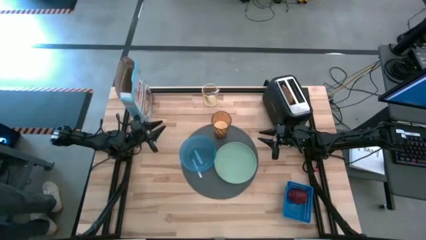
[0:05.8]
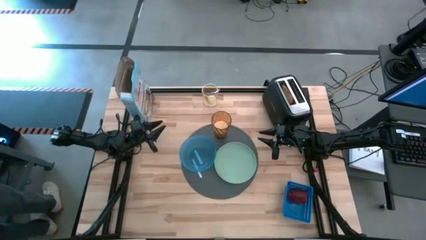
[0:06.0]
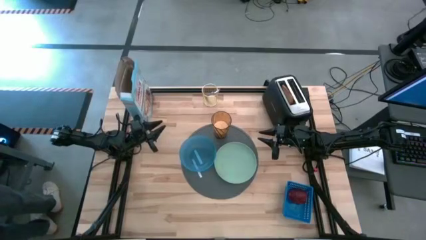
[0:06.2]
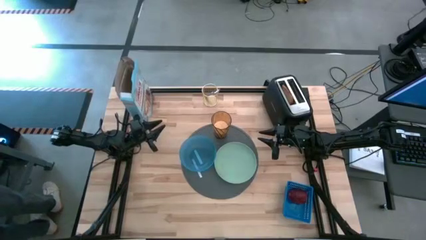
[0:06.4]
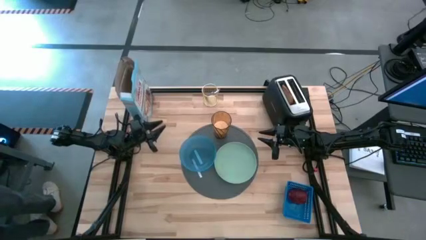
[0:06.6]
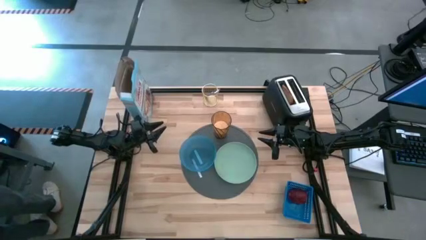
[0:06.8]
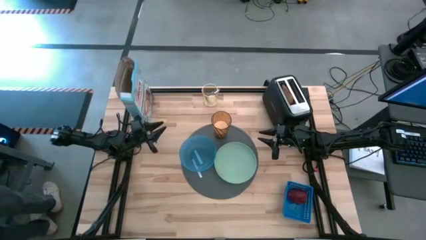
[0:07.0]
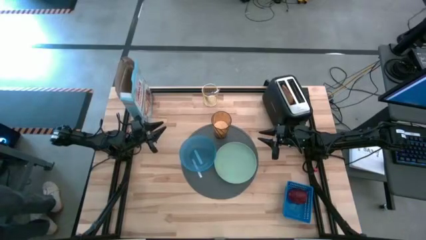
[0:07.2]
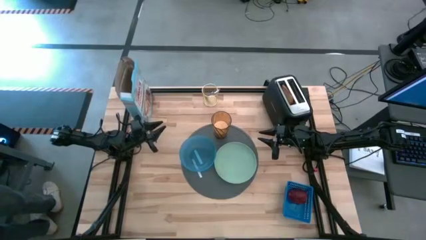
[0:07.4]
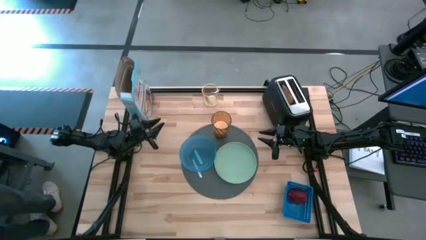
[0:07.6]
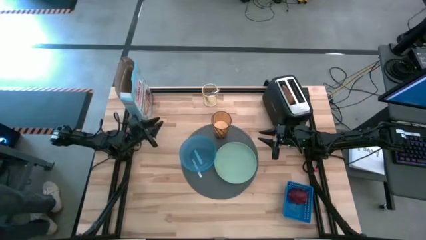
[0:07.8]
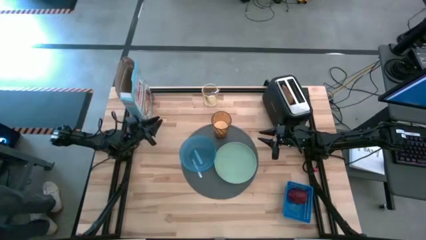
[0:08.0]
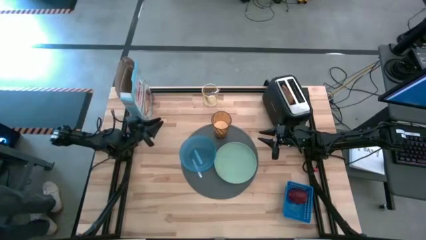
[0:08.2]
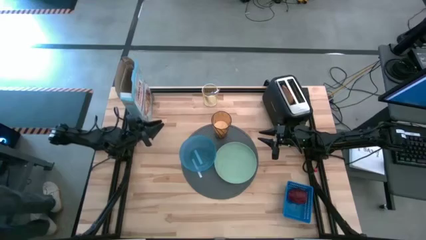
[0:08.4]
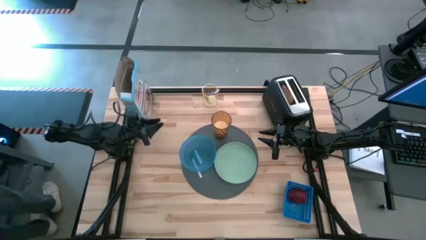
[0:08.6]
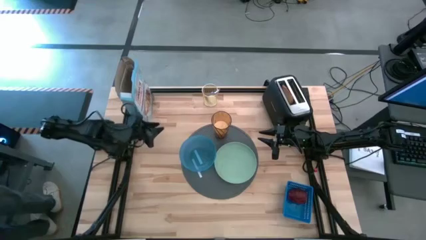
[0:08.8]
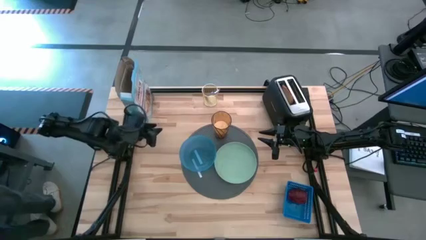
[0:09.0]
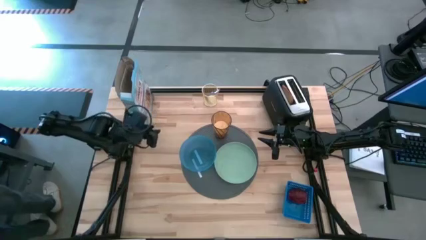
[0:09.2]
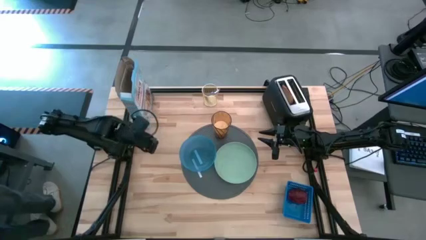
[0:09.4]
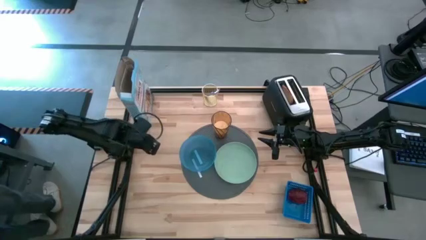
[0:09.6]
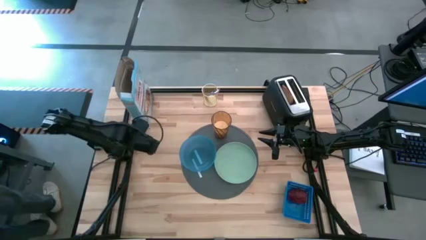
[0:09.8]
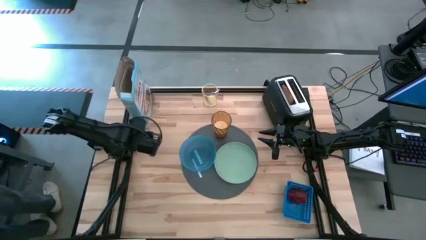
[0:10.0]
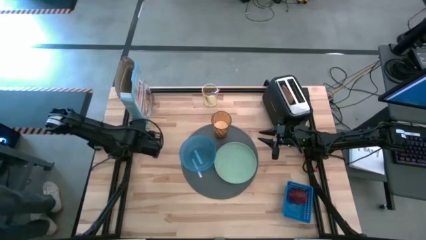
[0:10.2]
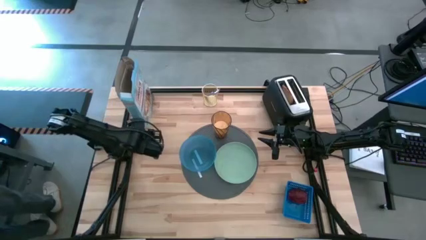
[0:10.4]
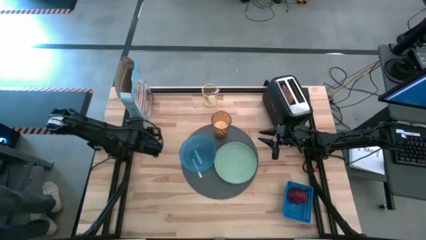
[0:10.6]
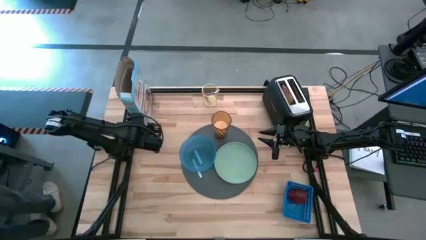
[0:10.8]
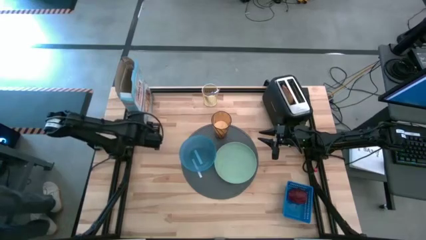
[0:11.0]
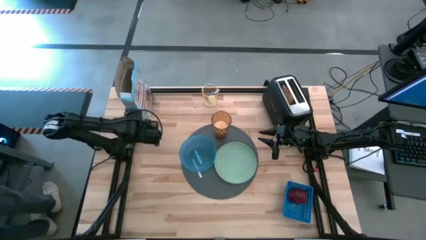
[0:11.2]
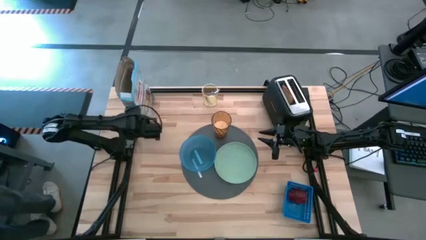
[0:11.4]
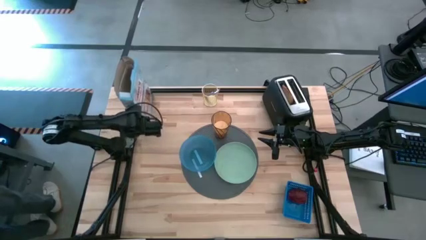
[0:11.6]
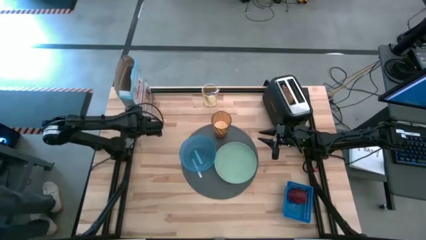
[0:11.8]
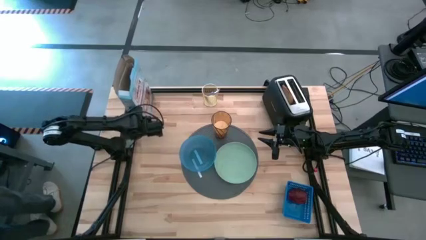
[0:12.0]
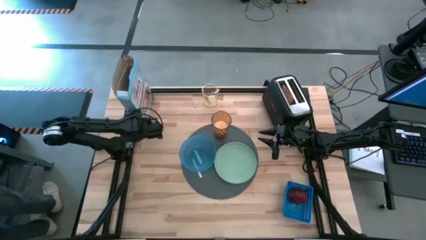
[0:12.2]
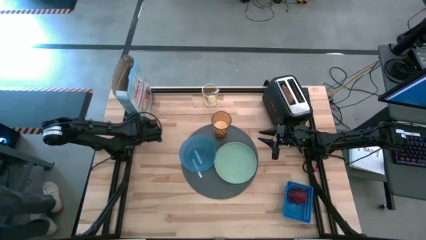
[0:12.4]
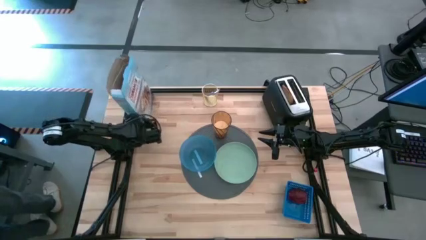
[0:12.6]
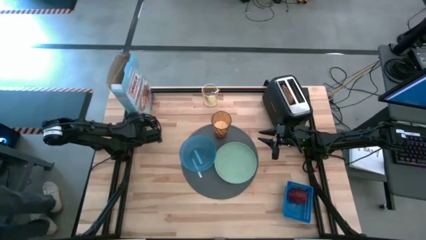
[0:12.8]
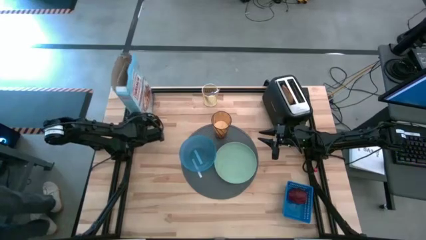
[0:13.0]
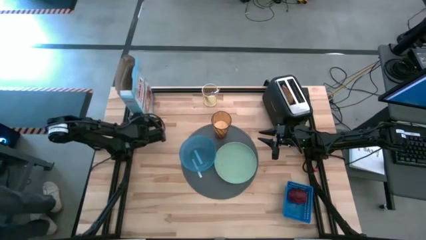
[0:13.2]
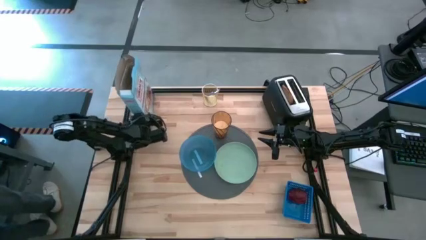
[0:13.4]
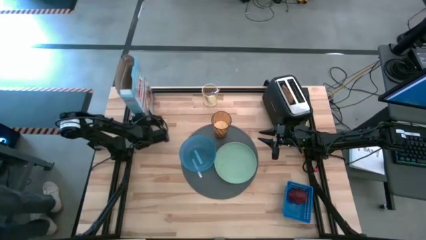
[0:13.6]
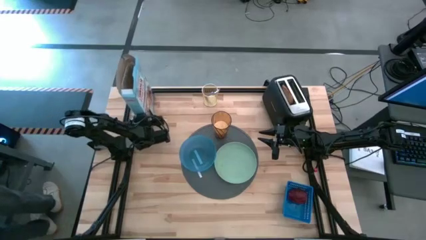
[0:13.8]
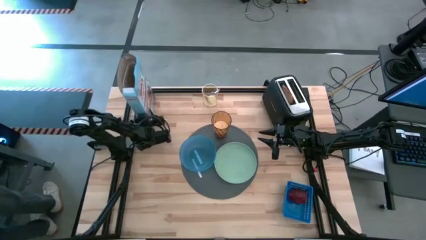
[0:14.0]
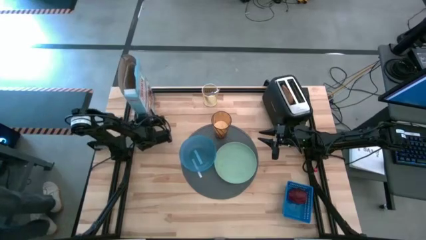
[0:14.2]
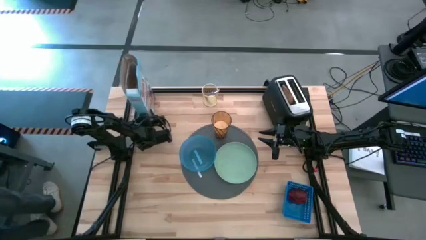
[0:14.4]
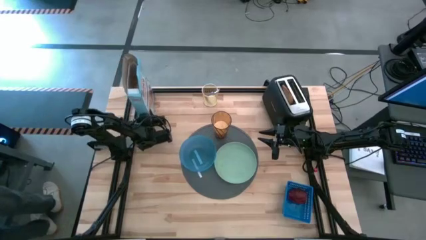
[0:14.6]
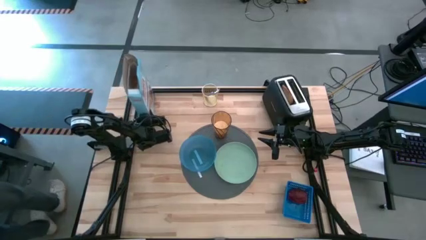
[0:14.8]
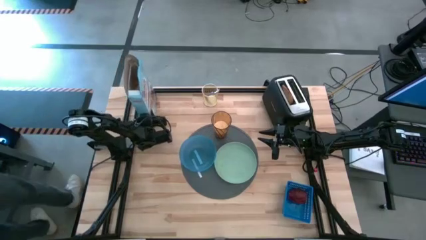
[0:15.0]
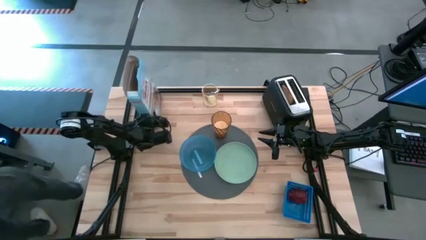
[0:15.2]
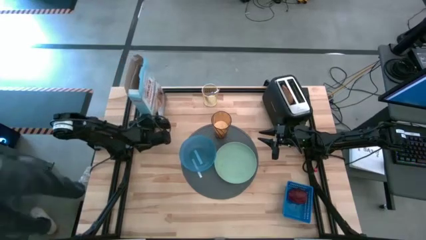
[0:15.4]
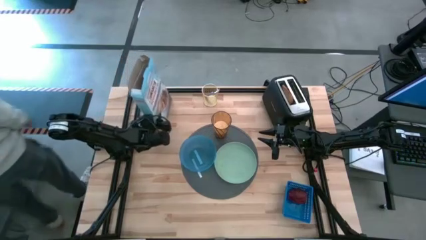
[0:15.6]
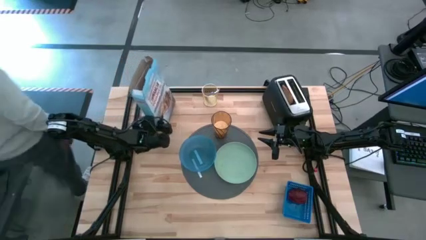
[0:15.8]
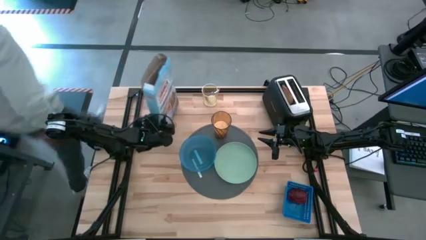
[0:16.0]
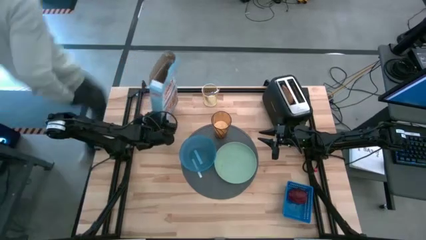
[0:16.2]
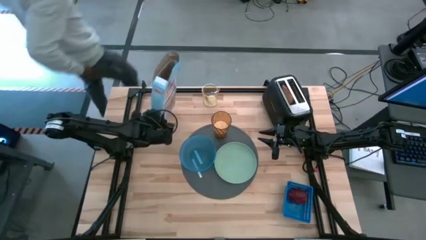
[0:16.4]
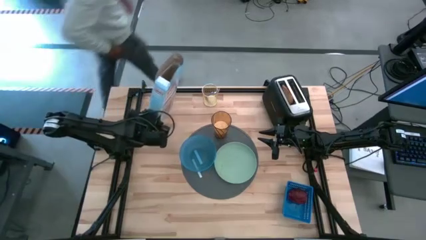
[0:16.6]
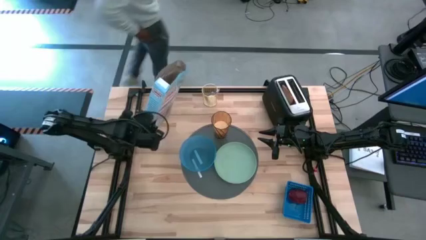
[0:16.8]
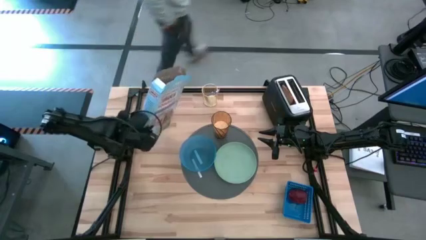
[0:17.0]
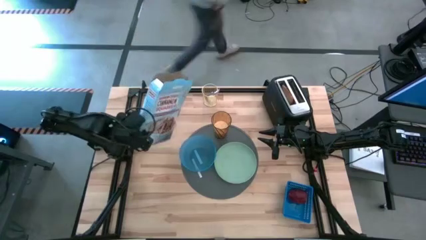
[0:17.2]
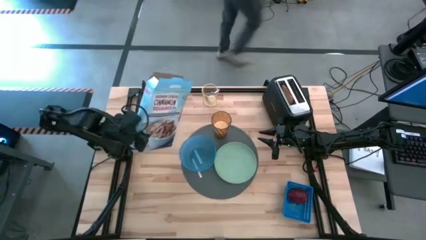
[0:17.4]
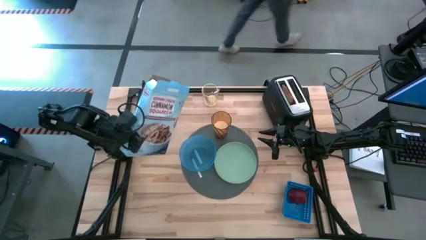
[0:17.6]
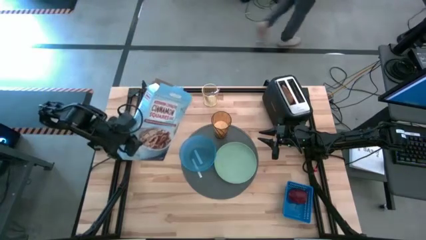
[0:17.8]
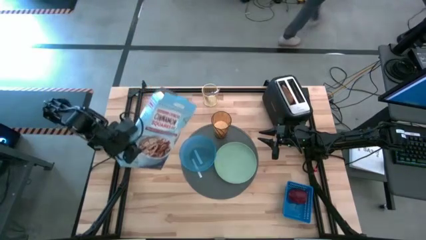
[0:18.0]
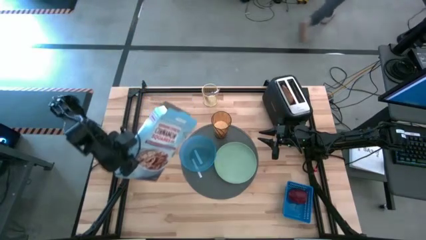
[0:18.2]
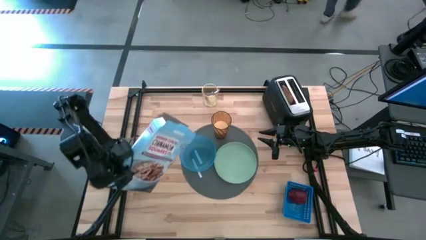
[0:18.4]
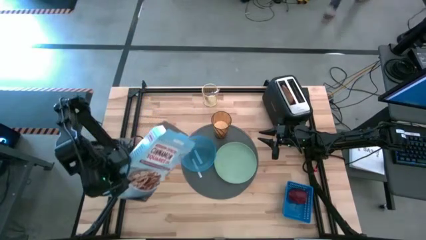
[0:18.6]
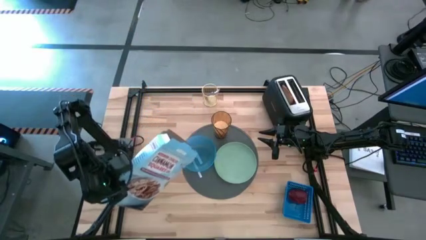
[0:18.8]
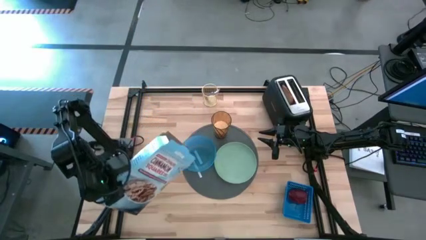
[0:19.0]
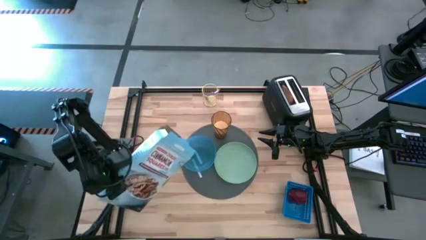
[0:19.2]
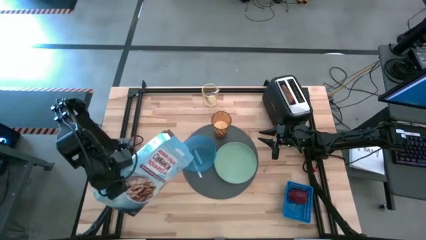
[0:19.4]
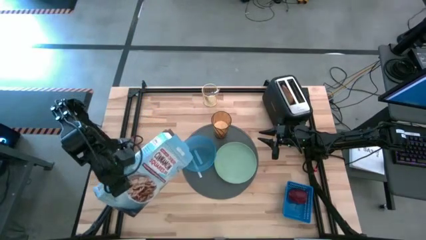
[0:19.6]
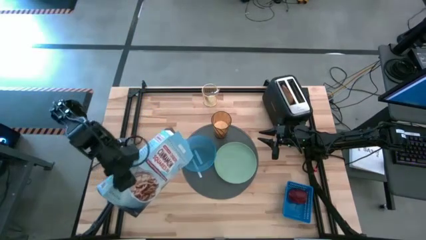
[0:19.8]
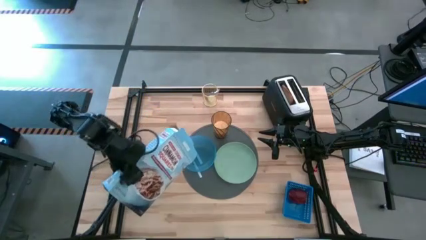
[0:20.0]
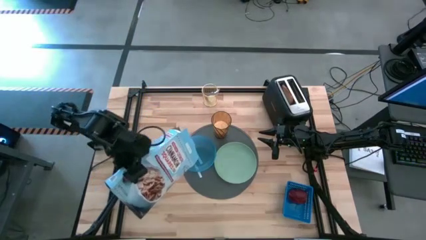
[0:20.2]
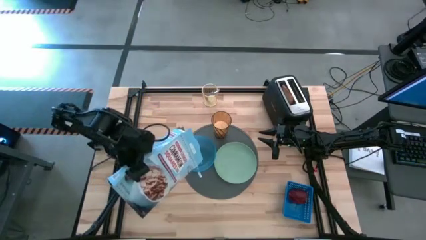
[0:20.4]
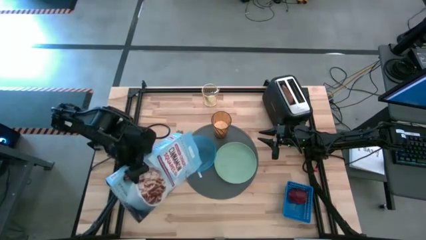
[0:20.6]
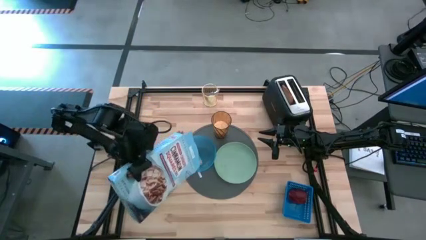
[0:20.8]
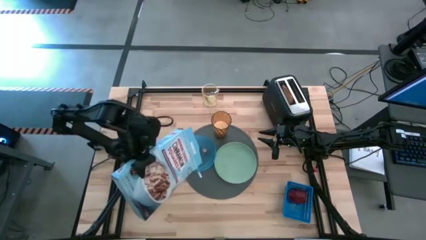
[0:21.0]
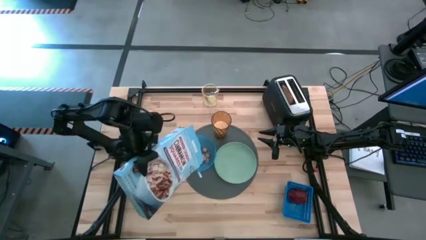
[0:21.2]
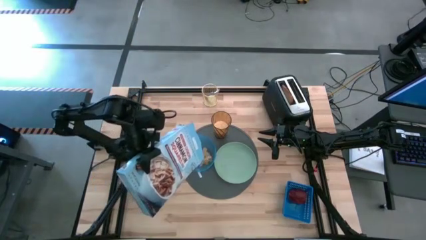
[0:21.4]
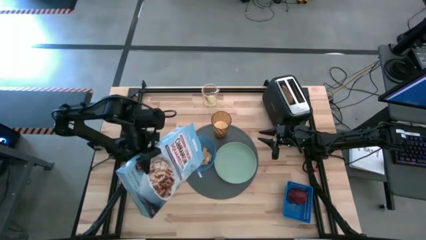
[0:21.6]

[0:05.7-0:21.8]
Task: Arrange a breakfast setting
Pour the cereal from the cereal box into a blue bowl
